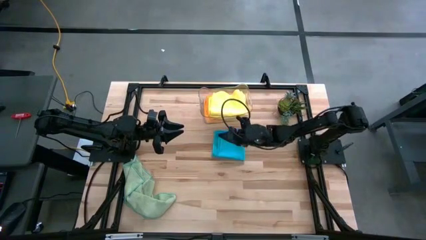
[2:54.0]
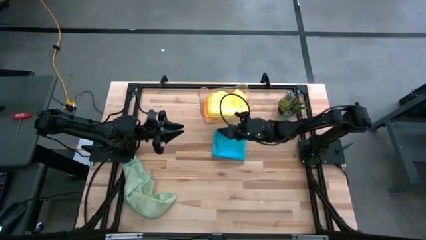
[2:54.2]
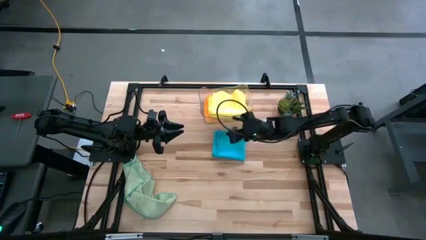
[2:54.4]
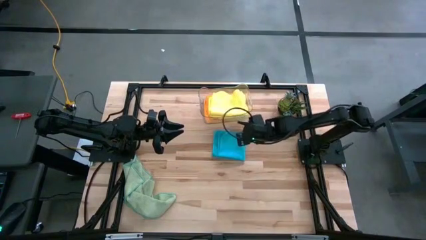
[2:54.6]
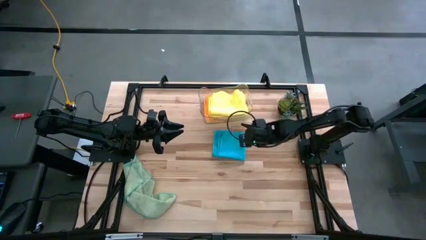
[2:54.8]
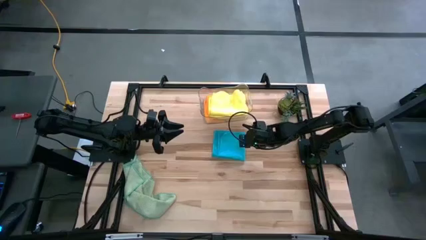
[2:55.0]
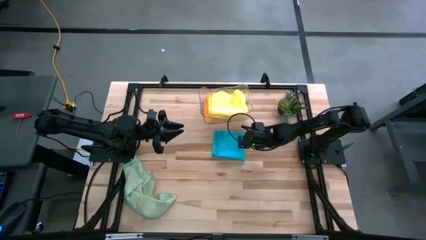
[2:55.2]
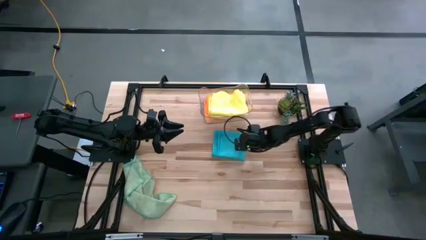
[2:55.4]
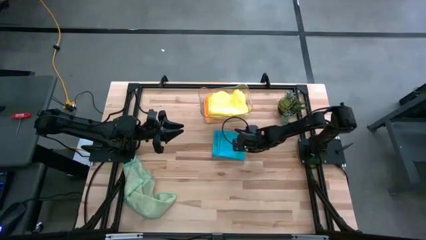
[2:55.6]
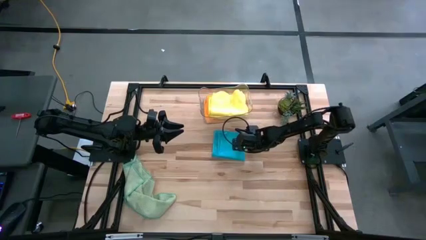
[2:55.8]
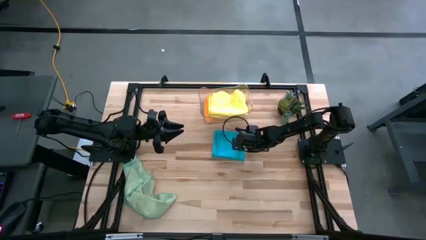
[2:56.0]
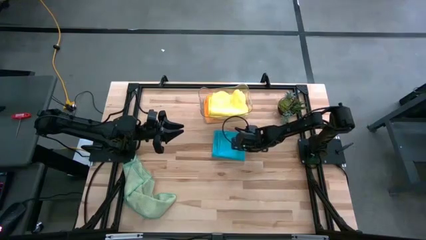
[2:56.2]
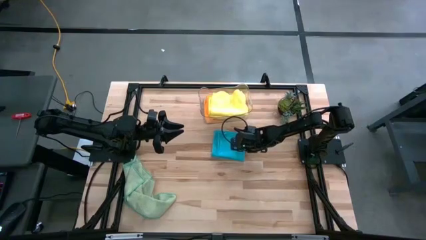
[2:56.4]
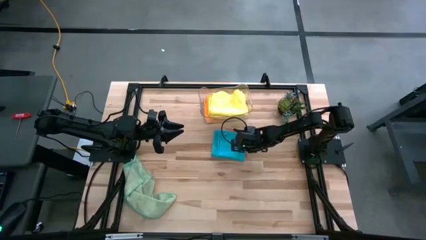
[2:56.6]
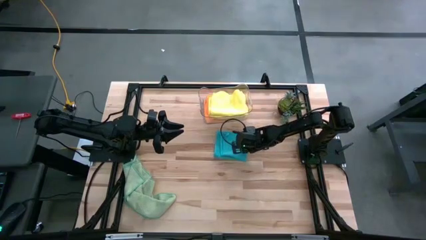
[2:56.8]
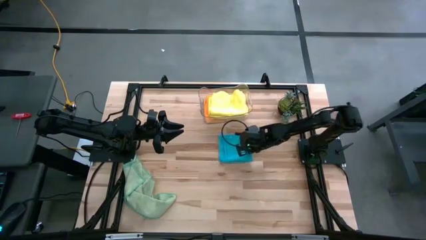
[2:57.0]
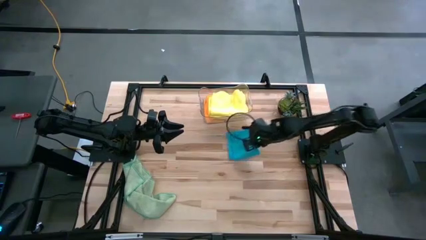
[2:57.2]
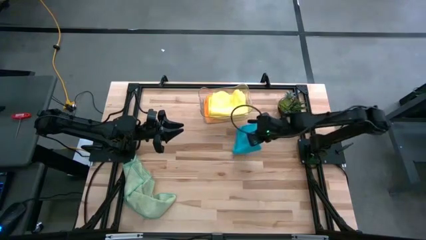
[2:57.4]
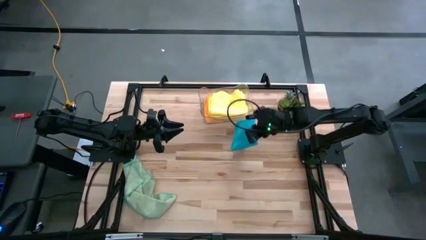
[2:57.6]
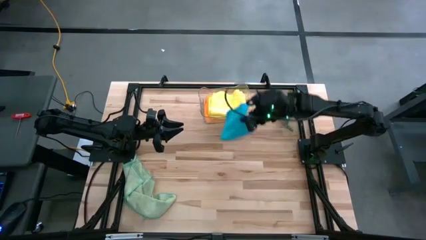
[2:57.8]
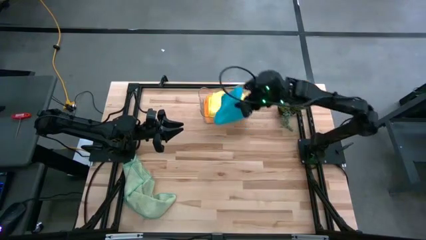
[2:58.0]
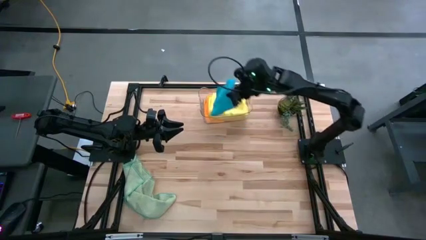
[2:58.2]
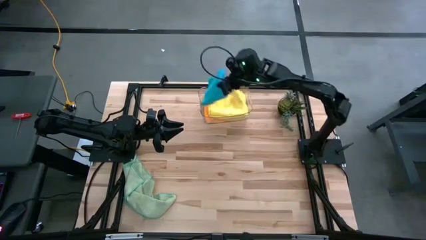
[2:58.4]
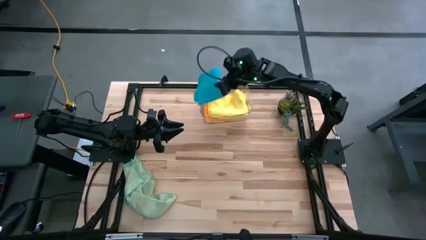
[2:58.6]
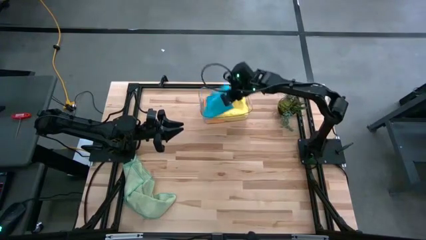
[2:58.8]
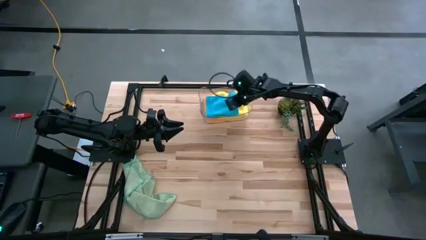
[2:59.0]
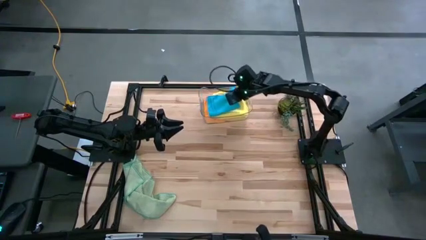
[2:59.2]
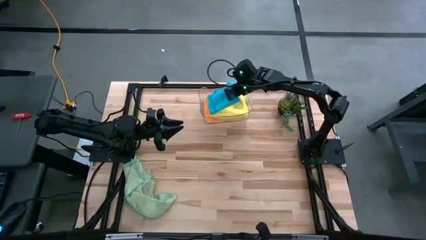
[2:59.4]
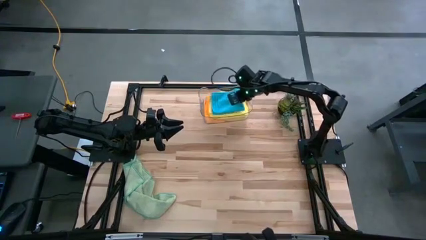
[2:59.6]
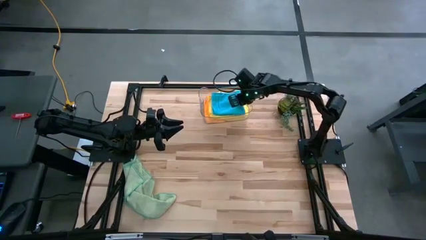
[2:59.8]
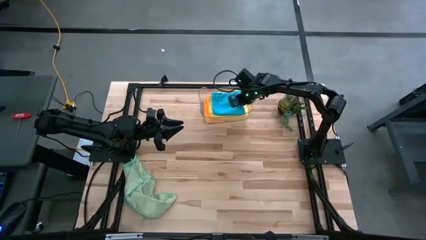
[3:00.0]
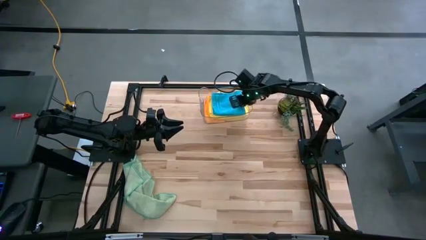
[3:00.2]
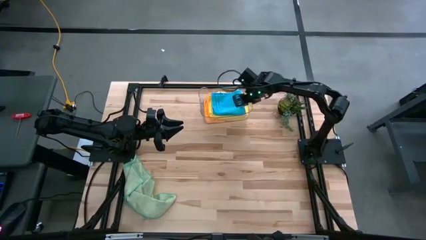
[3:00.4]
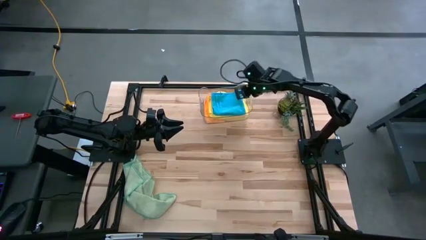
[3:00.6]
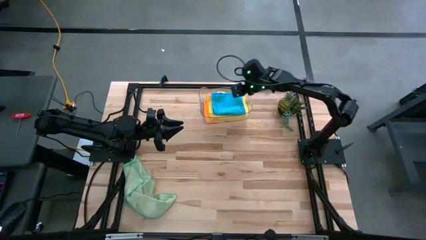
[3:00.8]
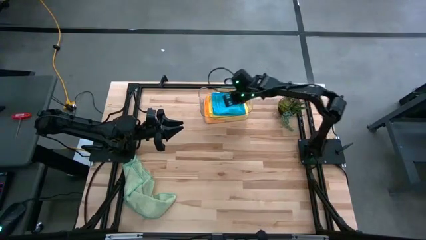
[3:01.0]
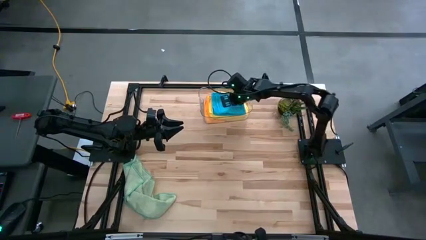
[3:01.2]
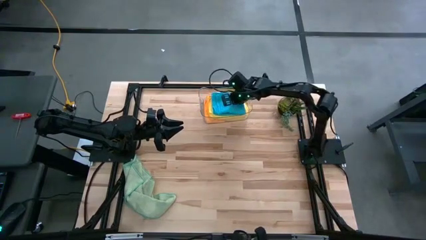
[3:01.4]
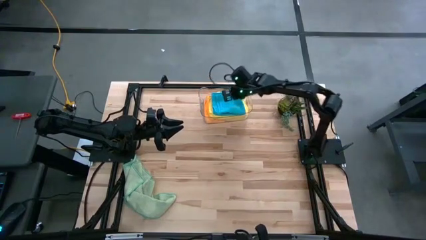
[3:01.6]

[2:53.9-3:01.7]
Task: Fold microfiber towels
Put the blue microfiber towel into the transparent bin

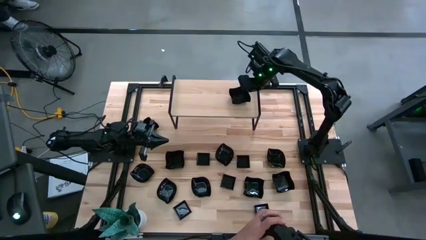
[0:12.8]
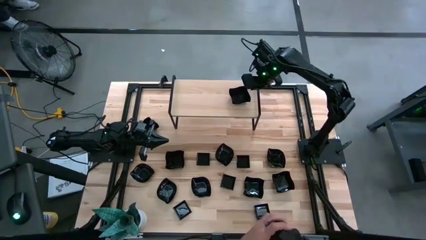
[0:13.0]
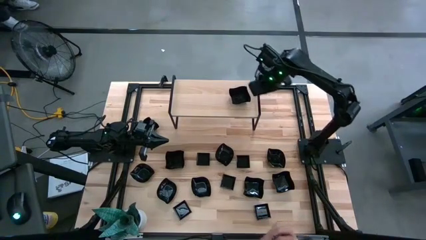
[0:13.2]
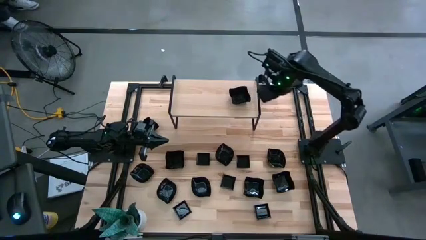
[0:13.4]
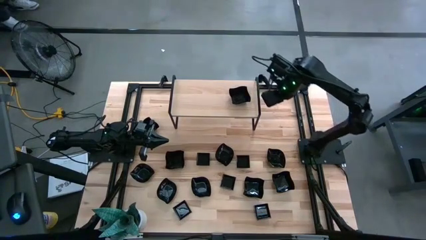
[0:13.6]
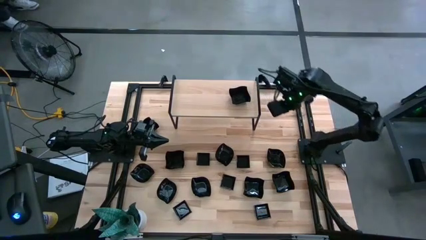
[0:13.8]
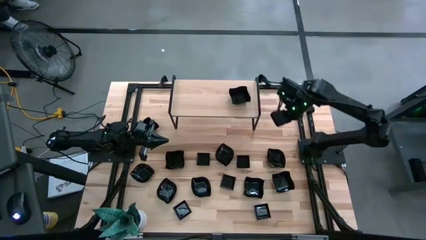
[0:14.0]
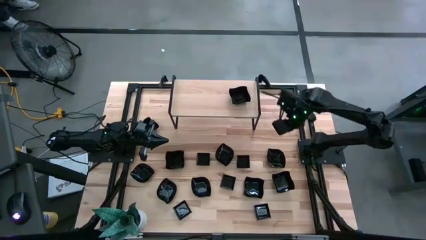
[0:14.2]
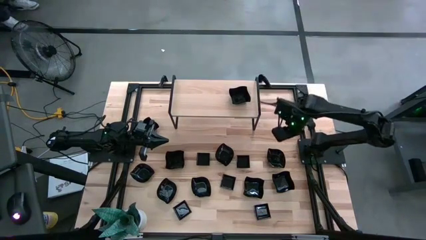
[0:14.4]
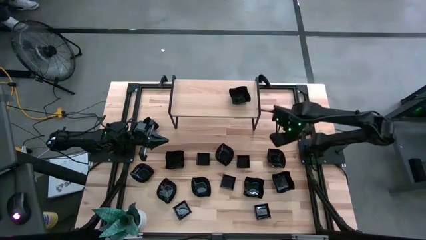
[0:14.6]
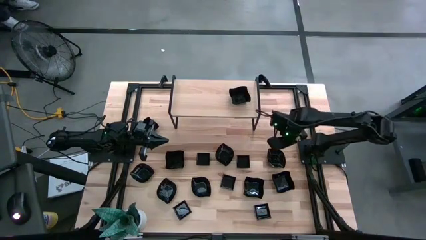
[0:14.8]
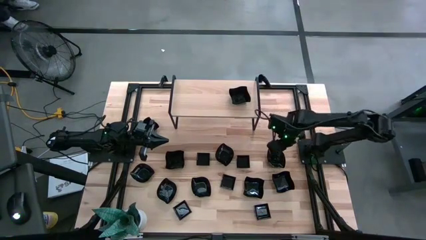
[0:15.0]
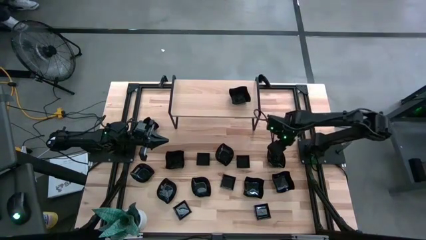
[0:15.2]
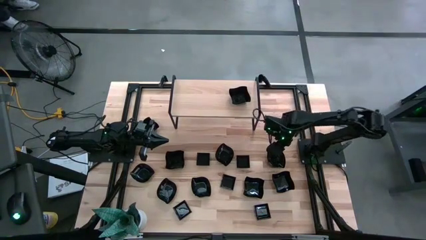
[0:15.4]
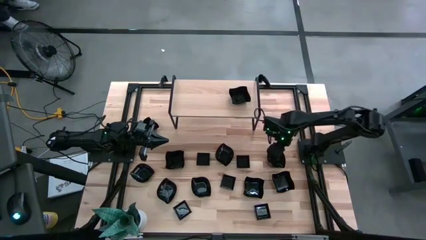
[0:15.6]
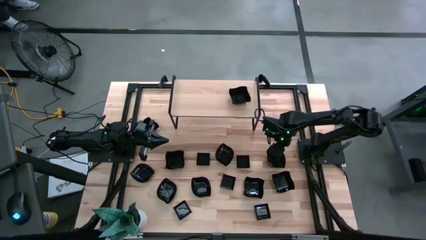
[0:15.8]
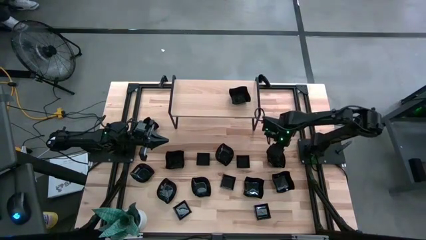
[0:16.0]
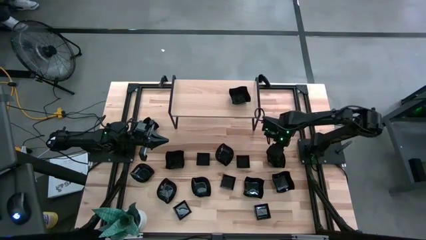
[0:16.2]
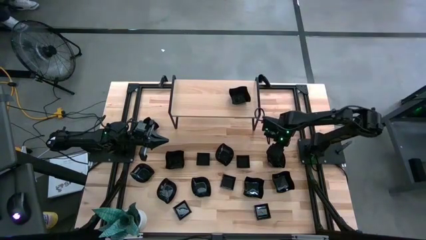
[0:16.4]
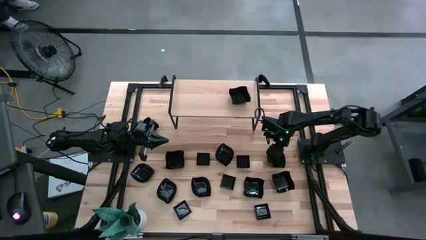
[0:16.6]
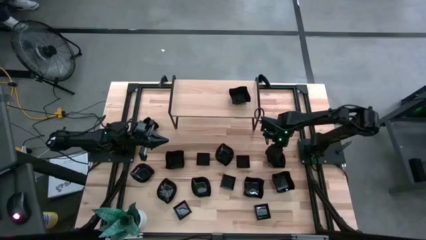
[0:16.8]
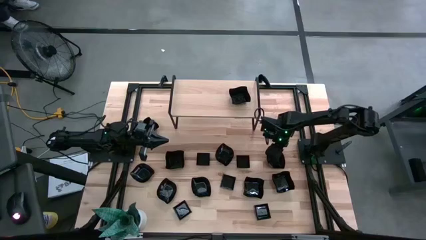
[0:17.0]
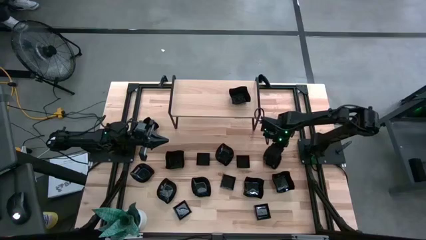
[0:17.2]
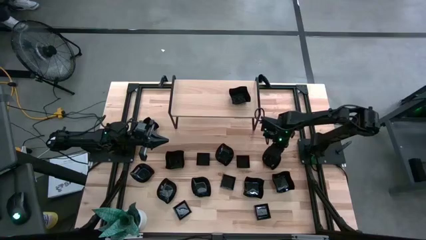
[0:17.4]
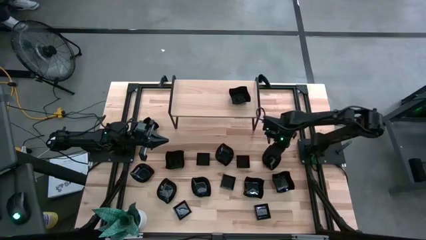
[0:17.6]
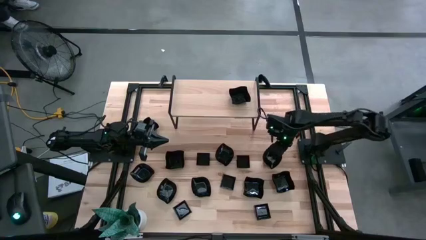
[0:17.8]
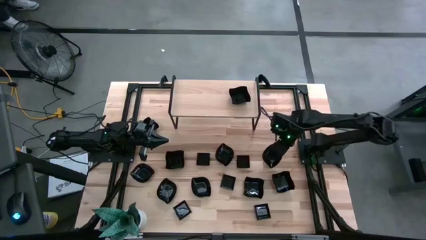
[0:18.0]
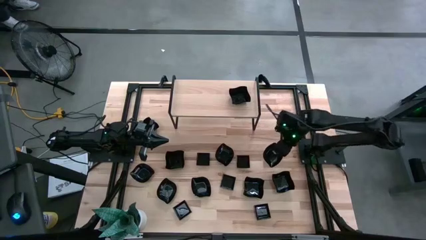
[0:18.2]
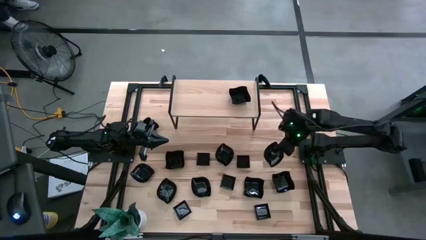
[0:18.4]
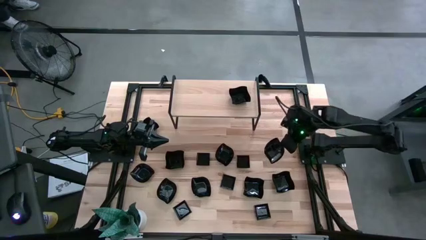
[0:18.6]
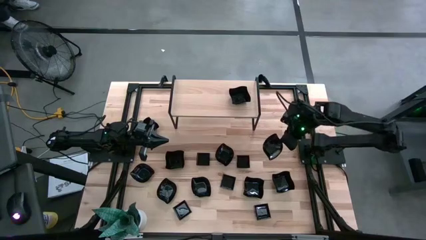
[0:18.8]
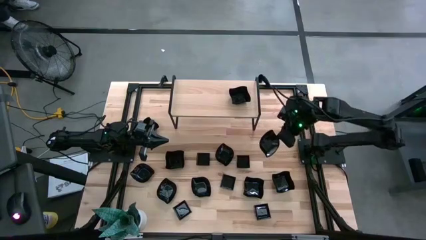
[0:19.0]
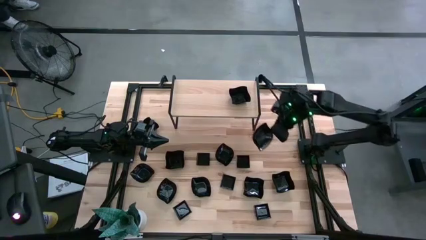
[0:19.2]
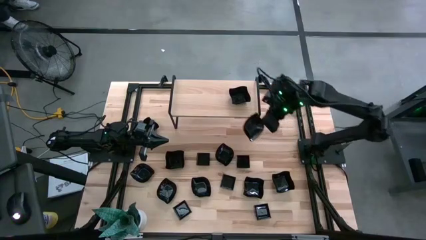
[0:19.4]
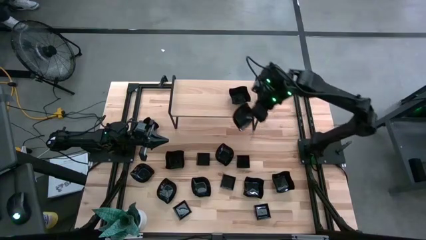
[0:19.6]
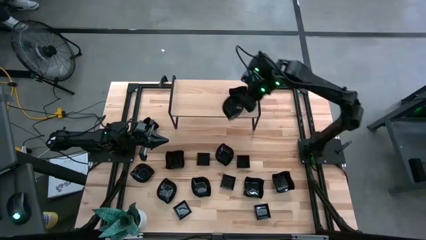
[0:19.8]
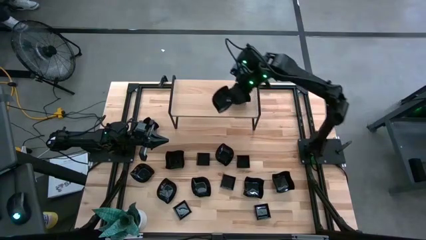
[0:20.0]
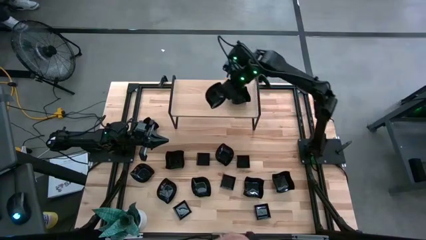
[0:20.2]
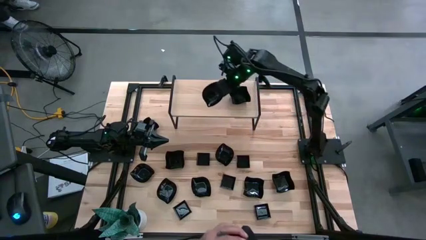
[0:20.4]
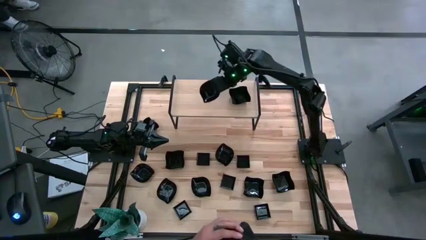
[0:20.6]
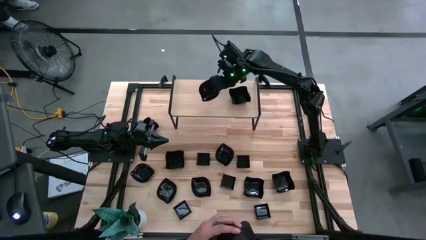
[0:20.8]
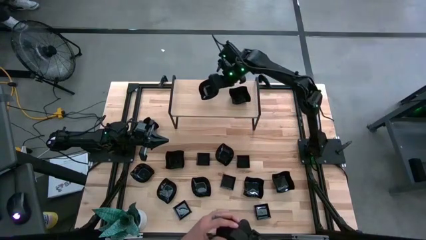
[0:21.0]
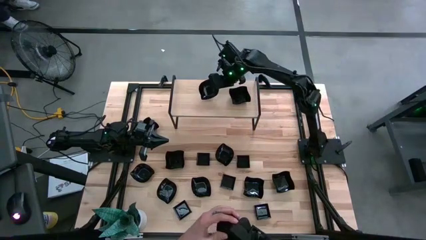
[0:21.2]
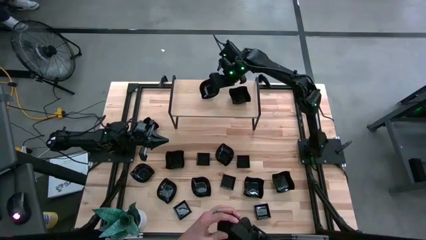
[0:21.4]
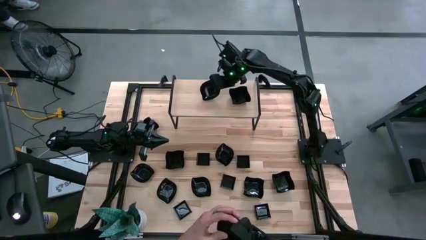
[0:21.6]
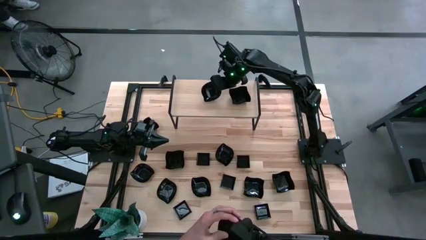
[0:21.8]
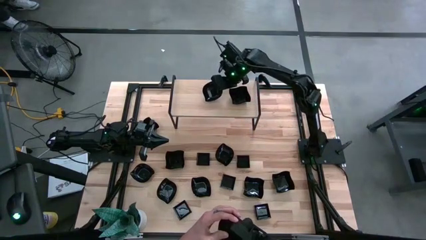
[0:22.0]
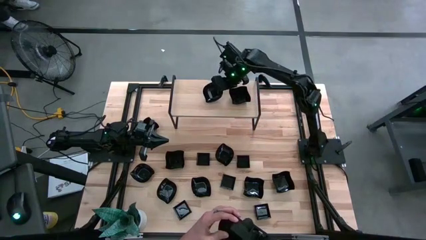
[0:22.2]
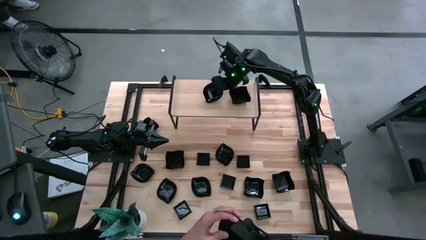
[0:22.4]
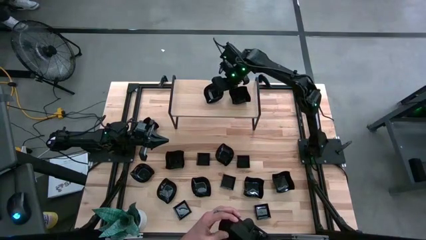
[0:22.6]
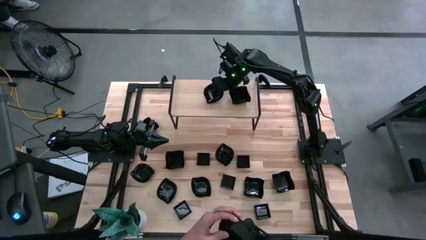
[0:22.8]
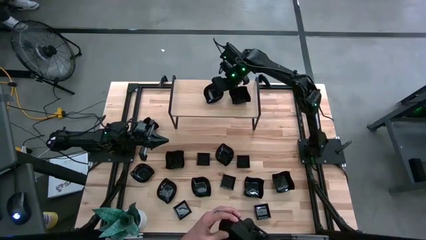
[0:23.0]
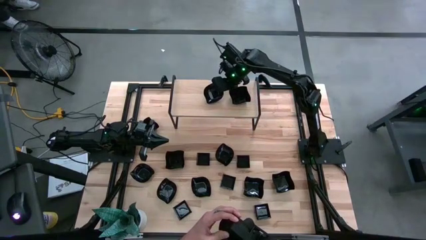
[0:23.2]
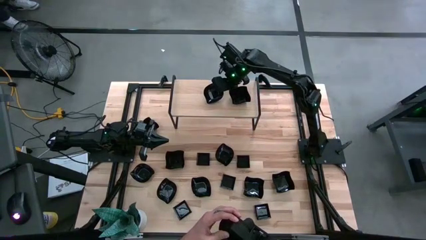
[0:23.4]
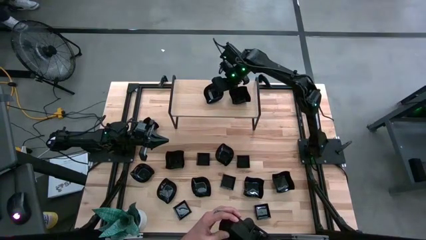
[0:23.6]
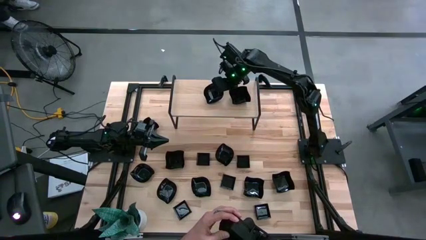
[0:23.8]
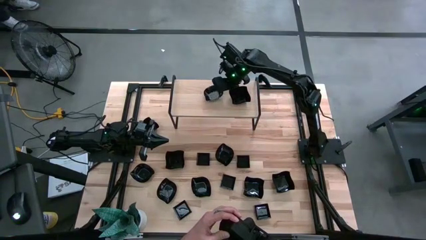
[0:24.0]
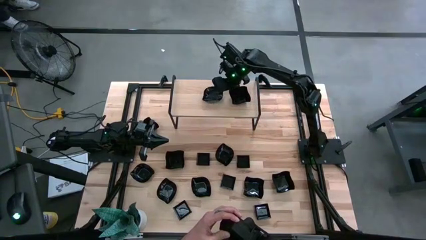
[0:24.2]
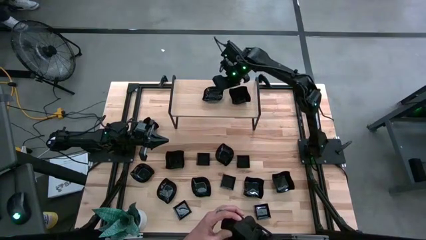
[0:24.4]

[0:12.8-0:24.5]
Task: Pick & Place Mini shaped plates
Put the leaf-shaped plate on the shelf
